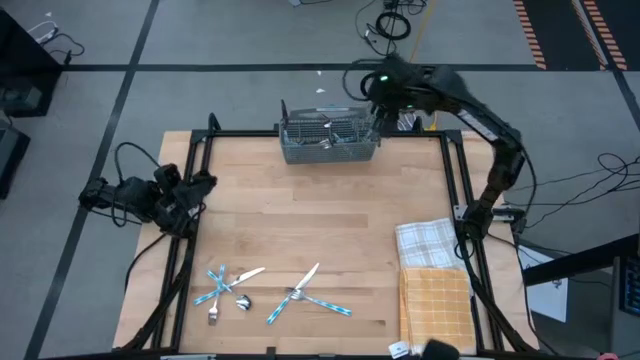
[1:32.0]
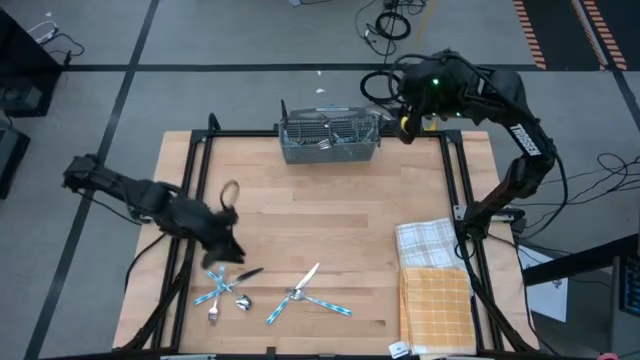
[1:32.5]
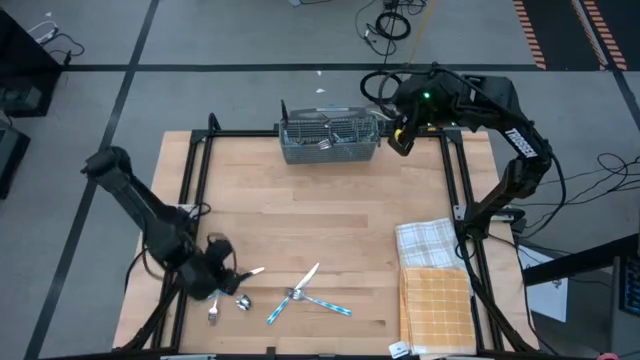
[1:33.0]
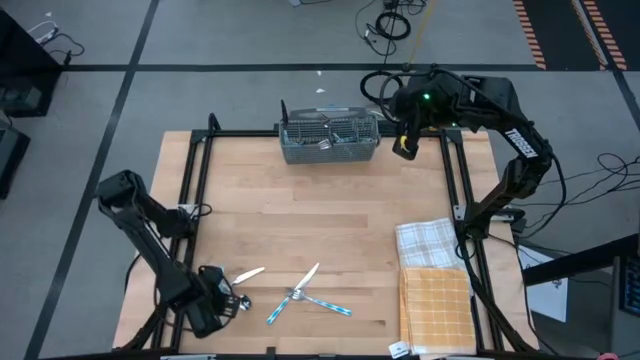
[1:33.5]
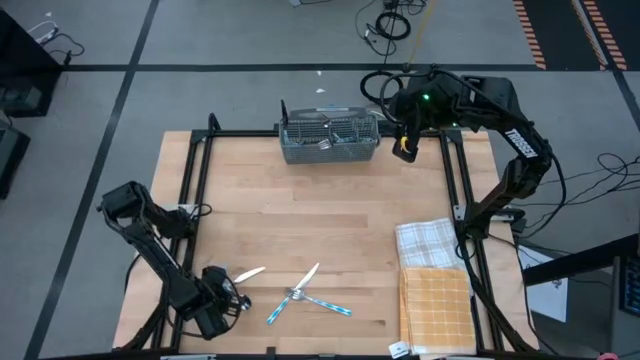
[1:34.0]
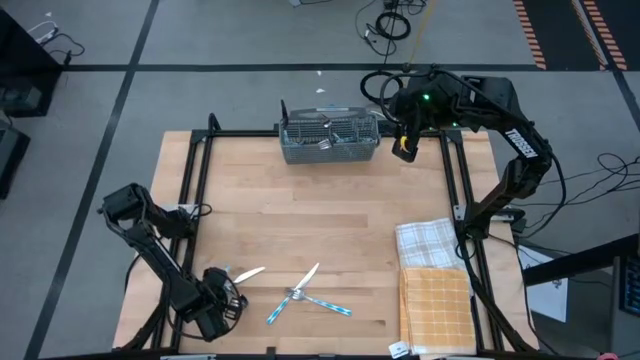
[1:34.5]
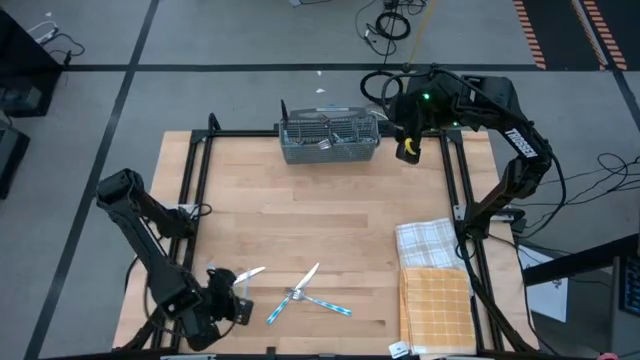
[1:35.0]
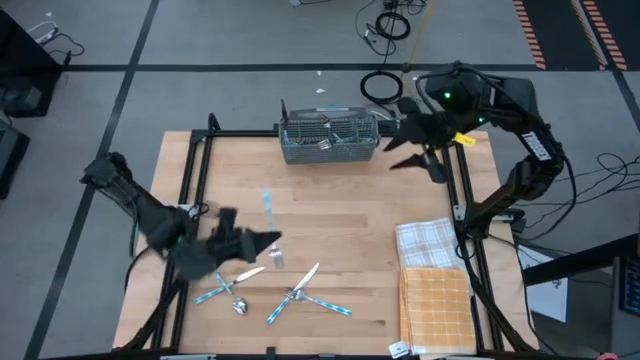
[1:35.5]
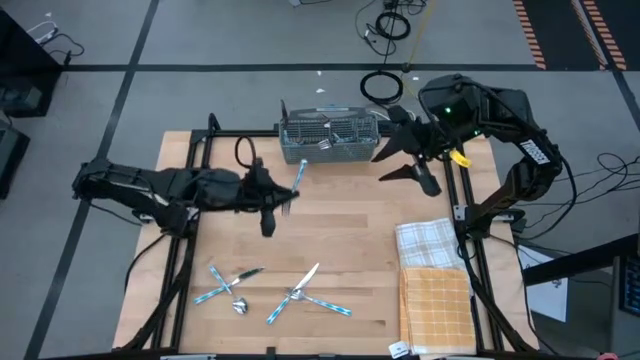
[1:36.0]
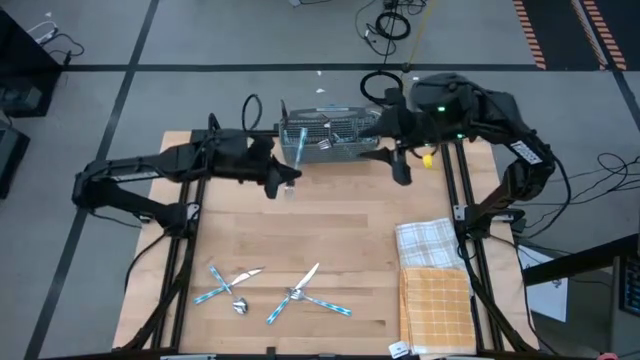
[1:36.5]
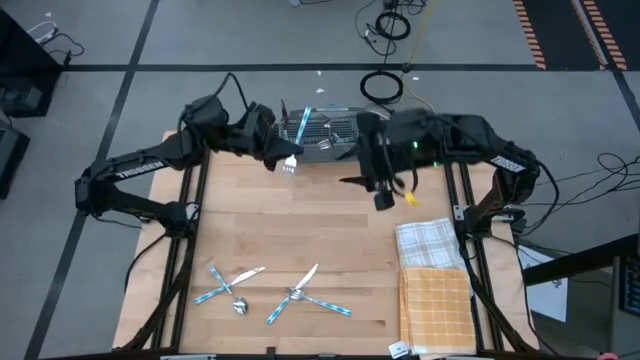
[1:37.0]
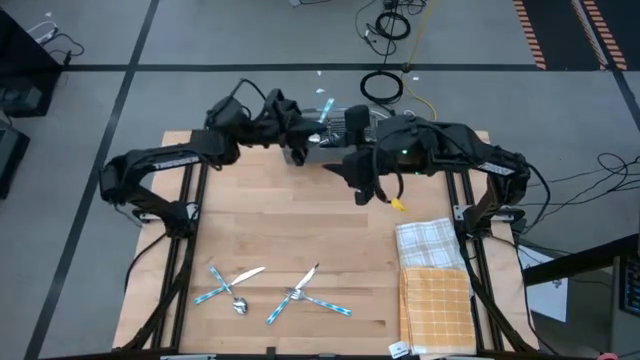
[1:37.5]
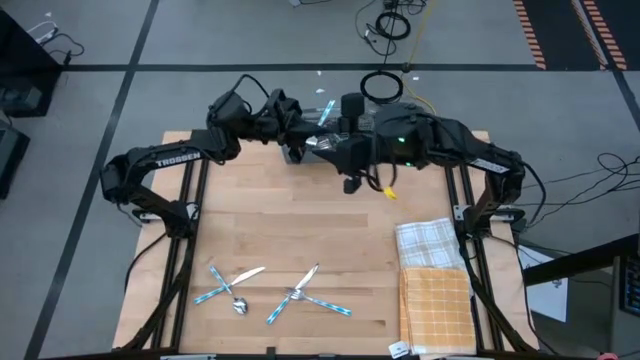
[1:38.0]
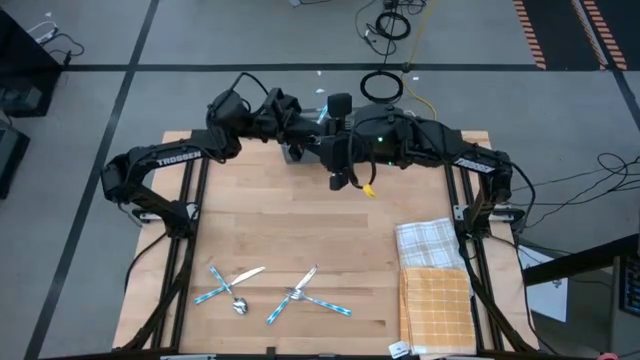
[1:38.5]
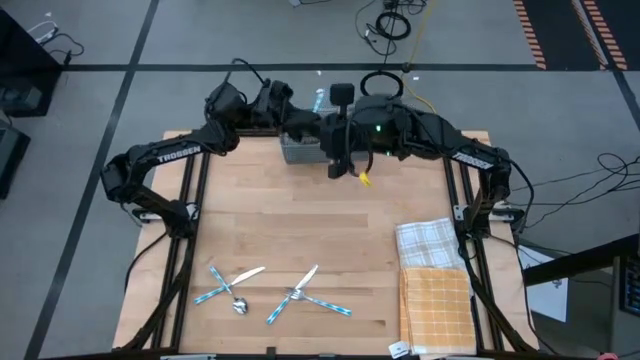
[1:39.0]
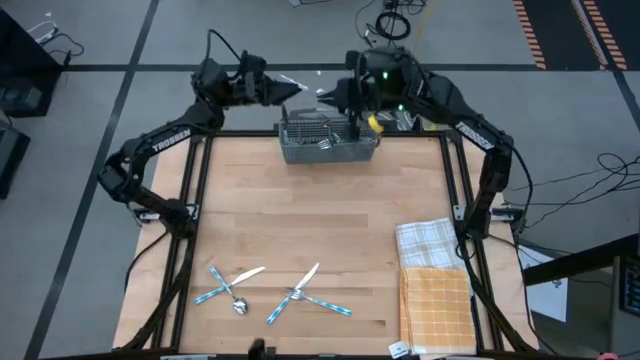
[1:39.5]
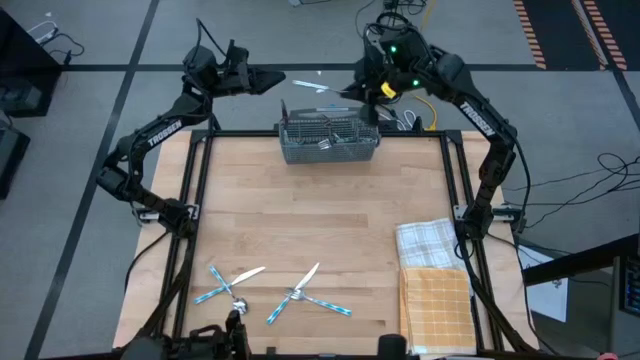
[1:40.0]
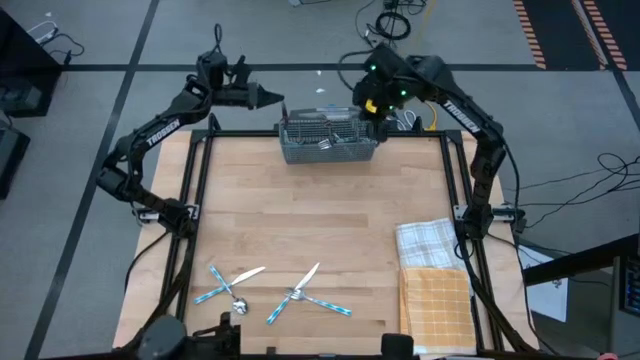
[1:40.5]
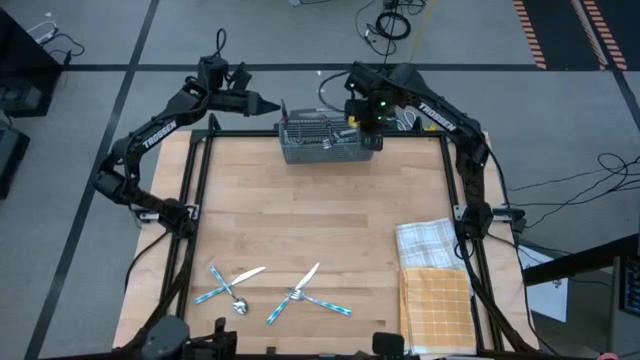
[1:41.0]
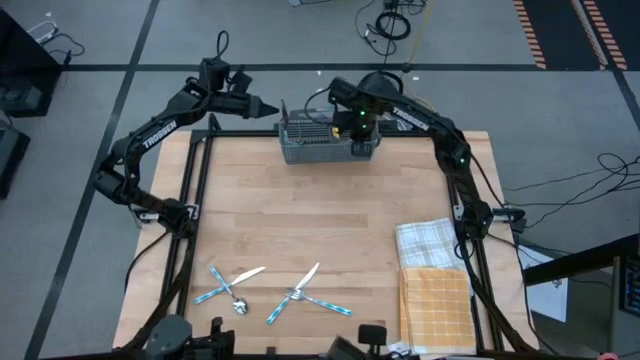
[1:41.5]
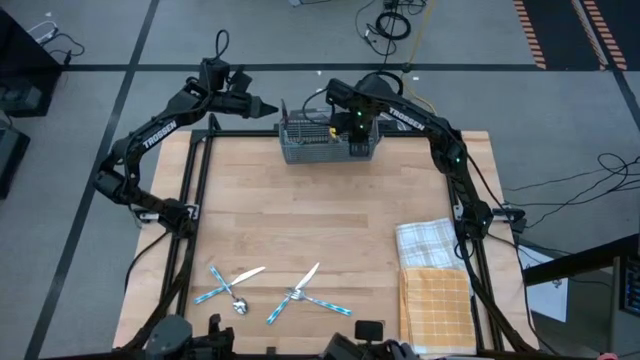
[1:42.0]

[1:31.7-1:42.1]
Task: Sort silverware
Put the fork into the silverware rack

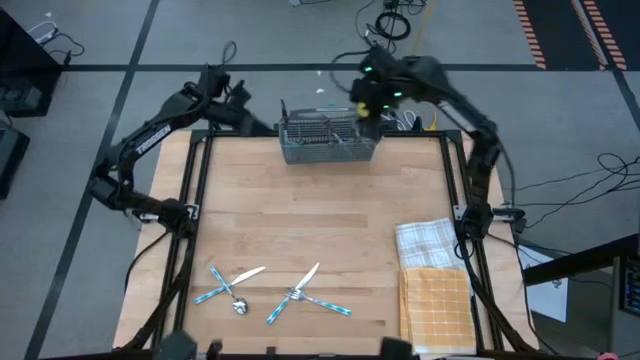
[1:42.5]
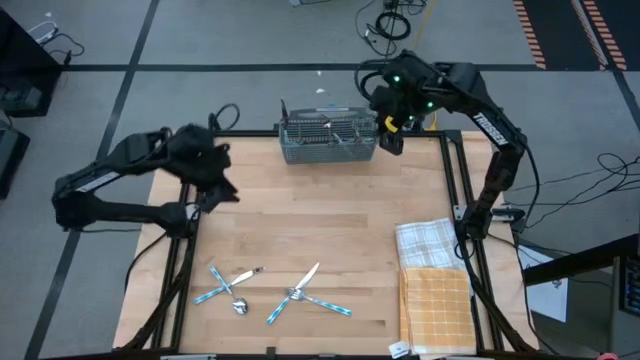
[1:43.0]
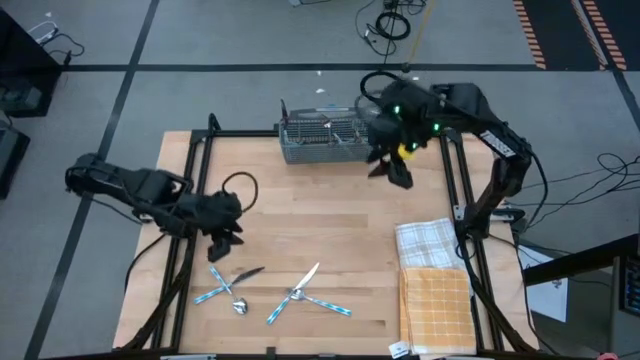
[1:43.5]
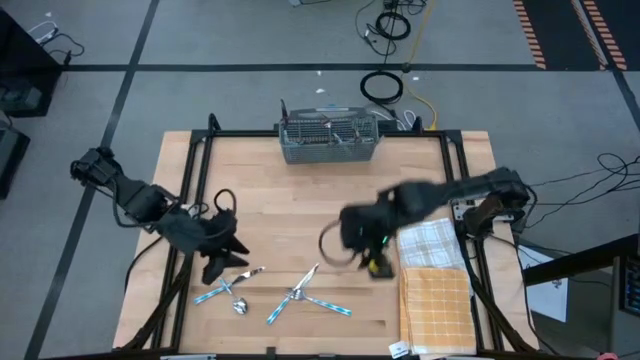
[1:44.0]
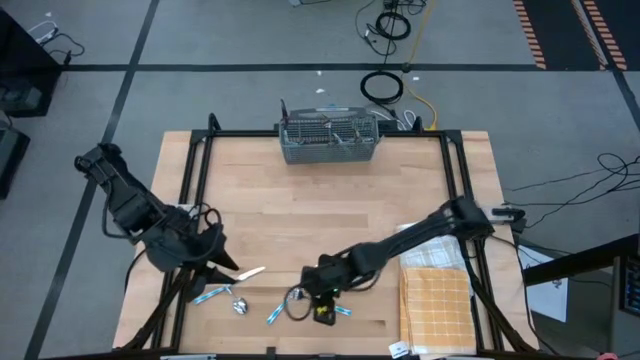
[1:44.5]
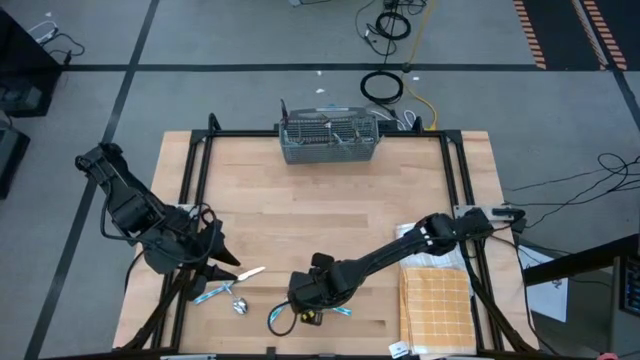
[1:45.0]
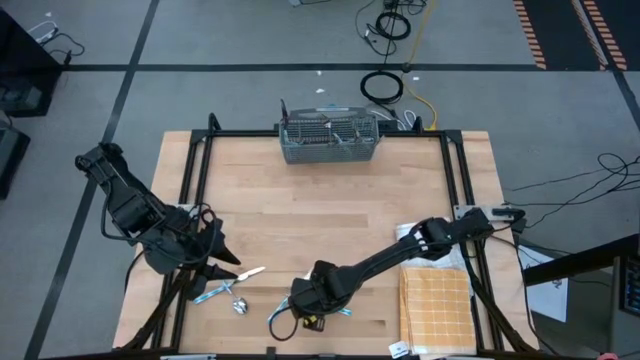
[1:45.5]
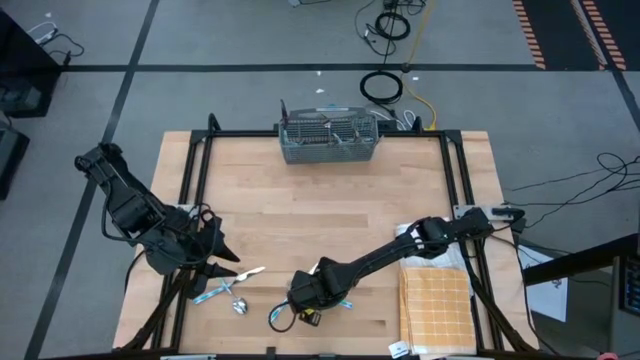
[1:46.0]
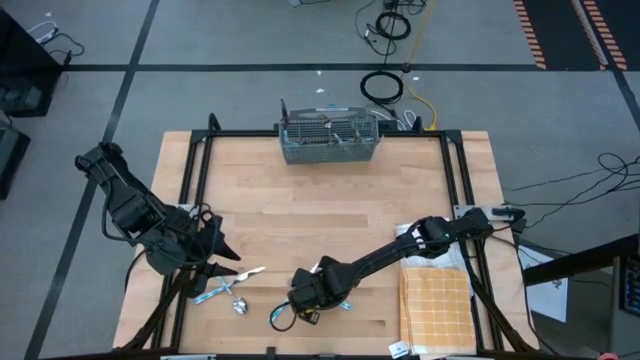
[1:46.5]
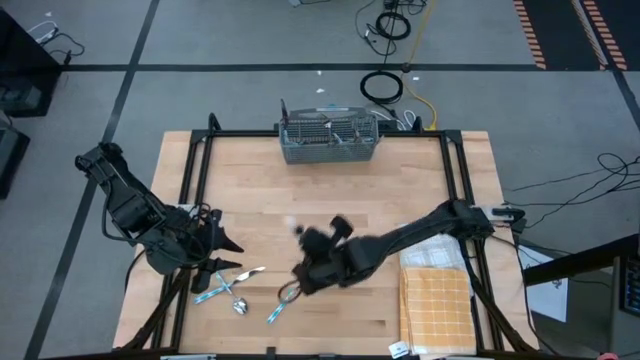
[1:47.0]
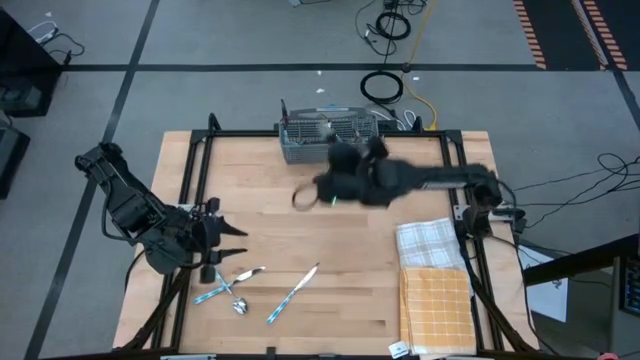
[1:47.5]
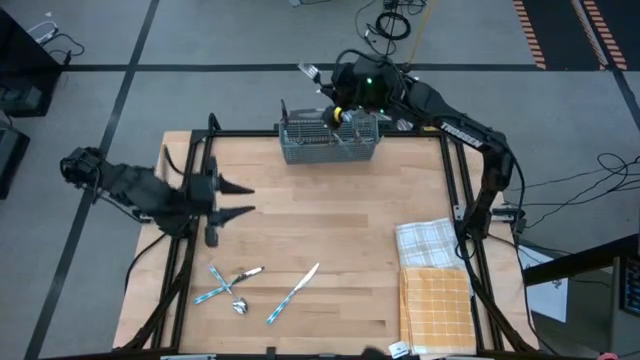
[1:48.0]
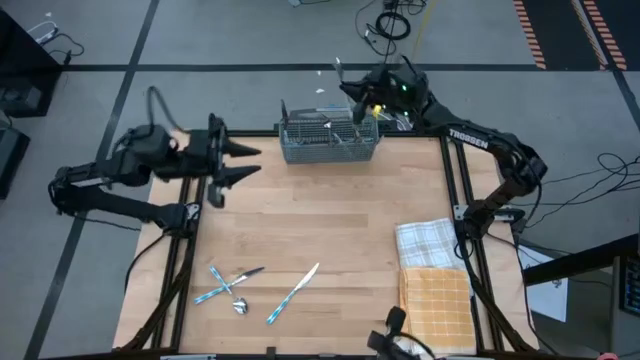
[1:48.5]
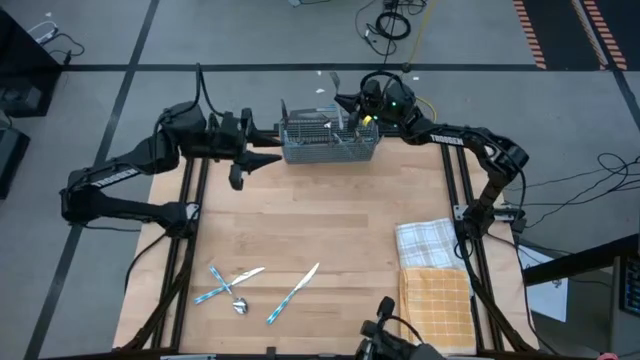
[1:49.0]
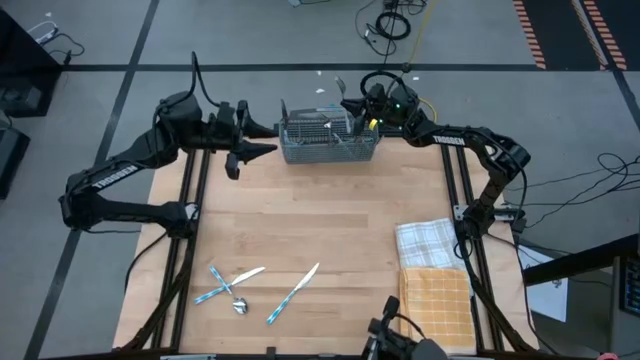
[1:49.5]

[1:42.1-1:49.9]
Put the fork into the silverware rack

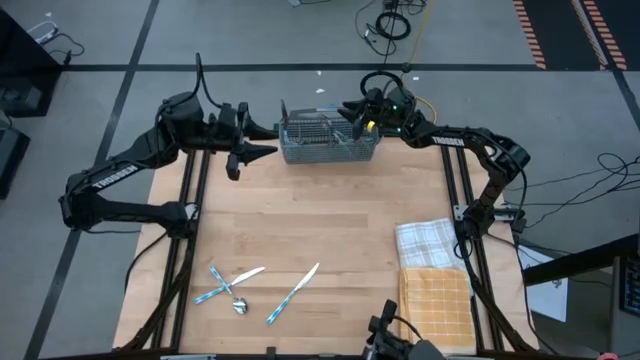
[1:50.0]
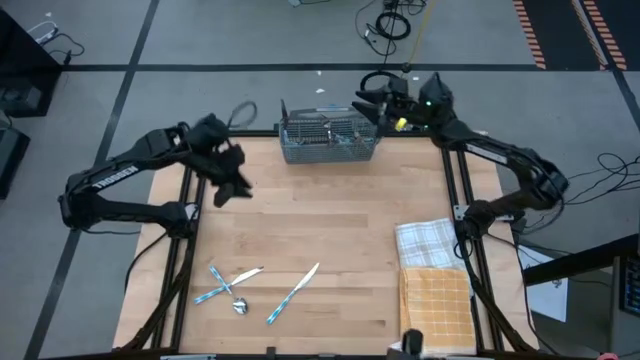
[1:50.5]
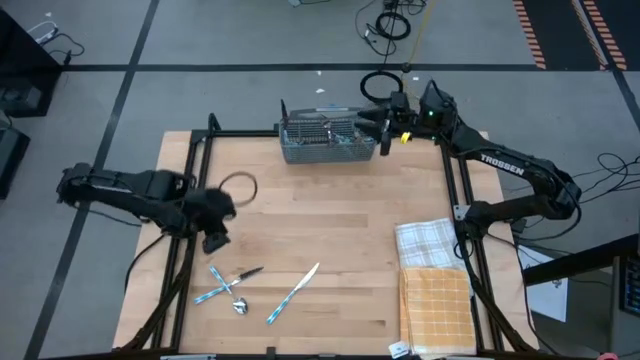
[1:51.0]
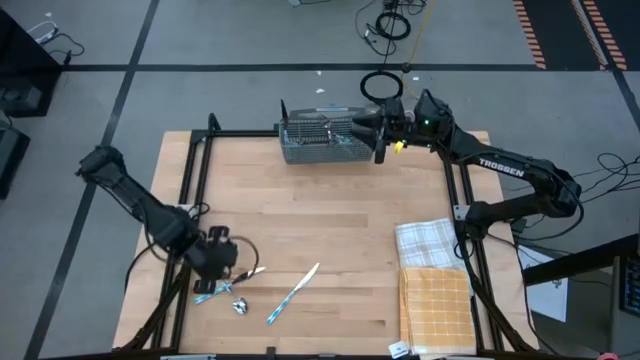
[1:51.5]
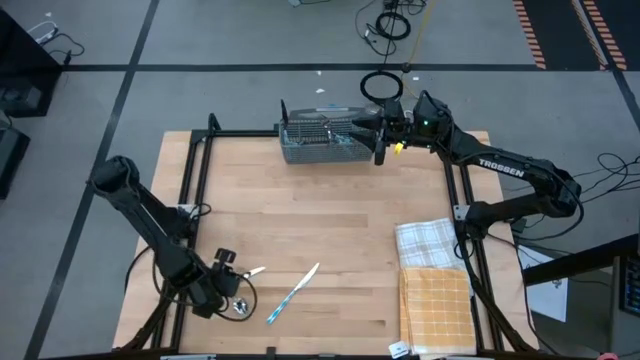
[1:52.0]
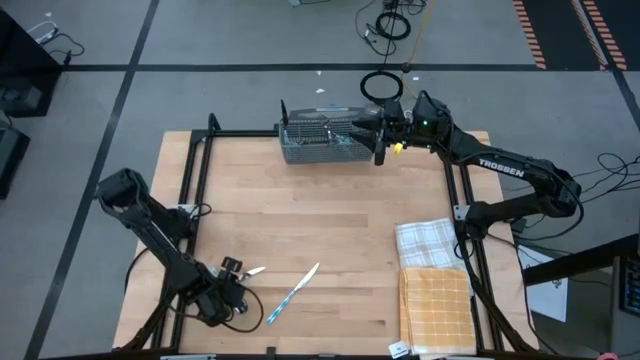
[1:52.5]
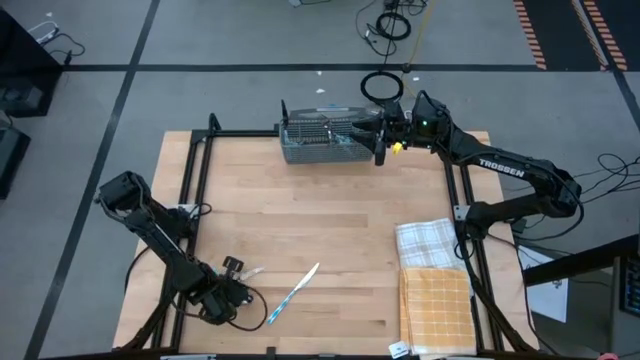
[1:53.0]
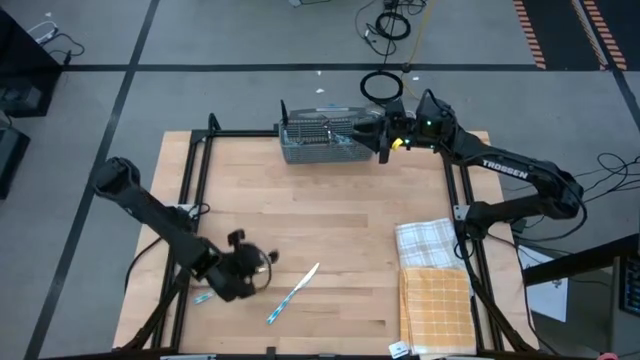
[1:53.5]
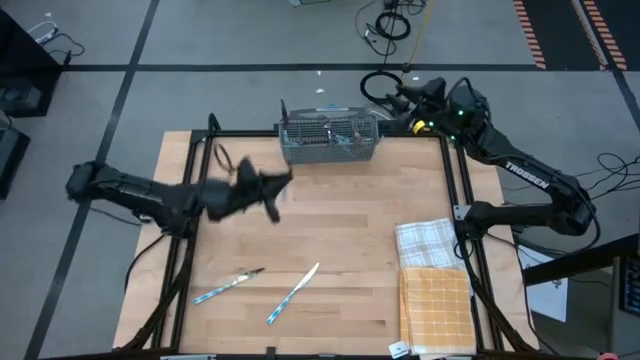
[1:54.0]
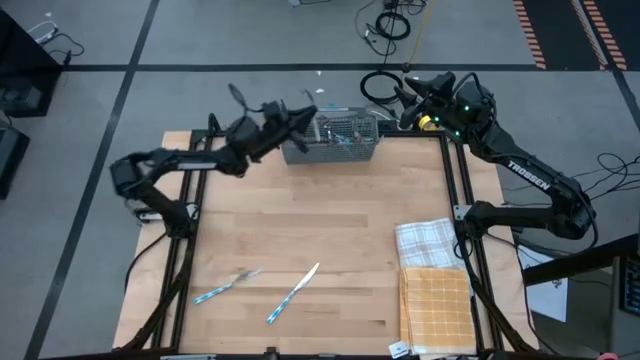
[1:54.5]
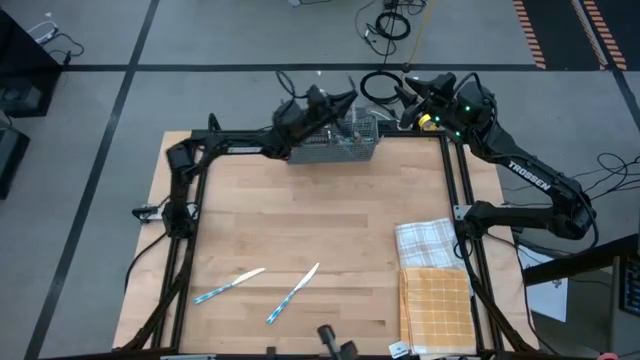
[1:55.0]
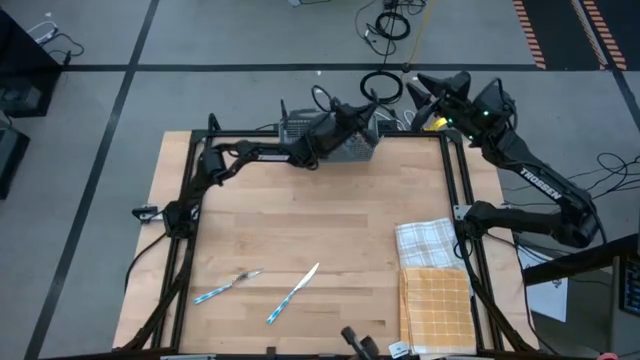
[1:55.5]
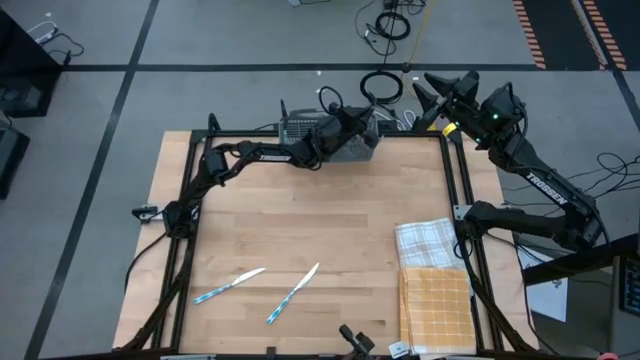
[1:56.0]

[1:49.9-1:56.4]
Put the spoon into the silverware rack
